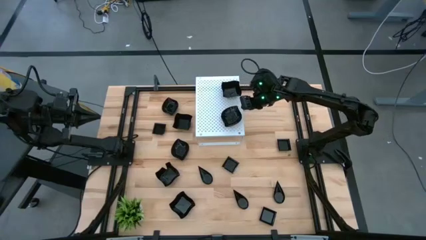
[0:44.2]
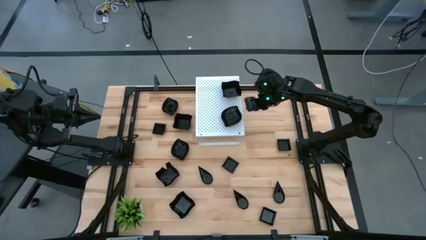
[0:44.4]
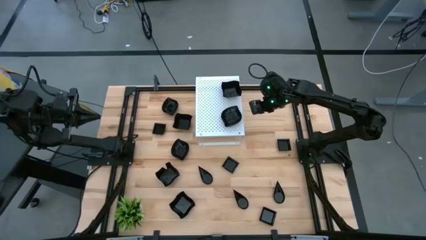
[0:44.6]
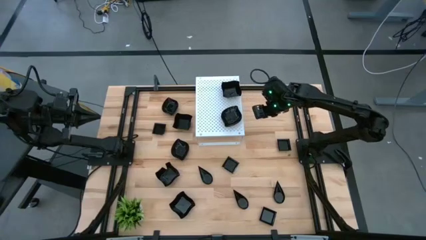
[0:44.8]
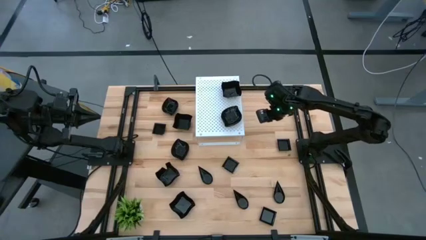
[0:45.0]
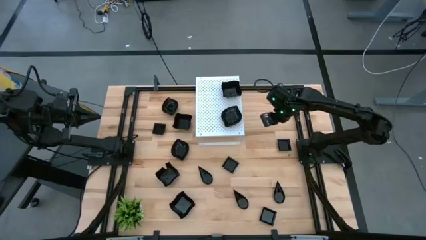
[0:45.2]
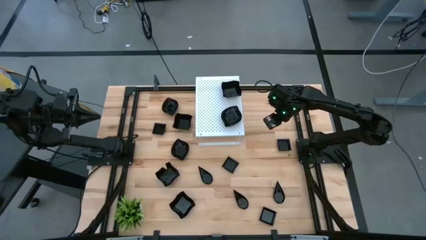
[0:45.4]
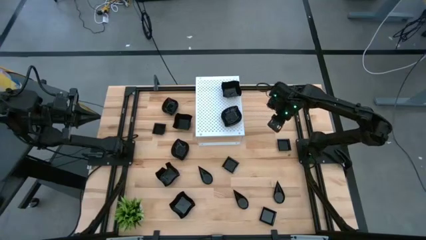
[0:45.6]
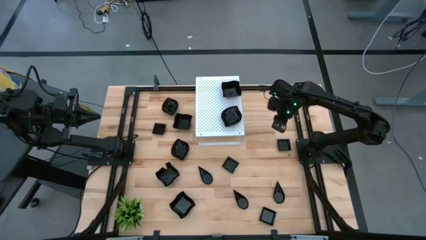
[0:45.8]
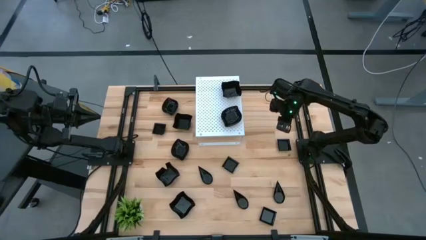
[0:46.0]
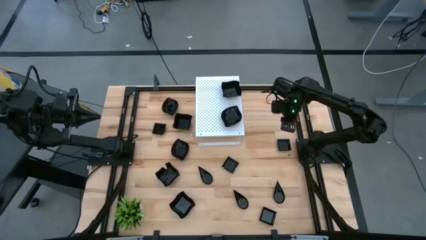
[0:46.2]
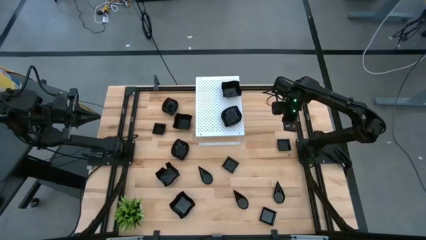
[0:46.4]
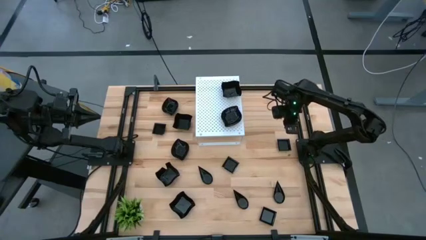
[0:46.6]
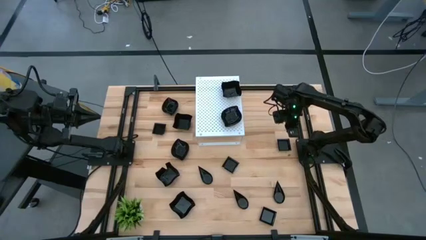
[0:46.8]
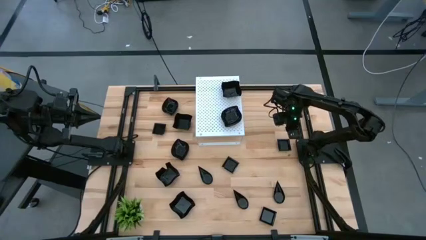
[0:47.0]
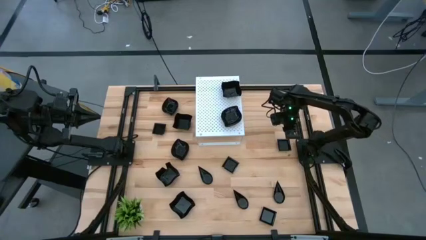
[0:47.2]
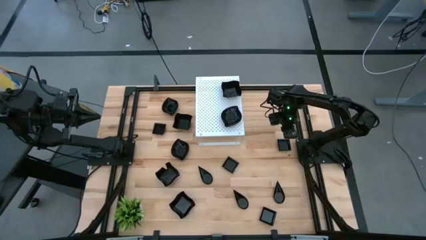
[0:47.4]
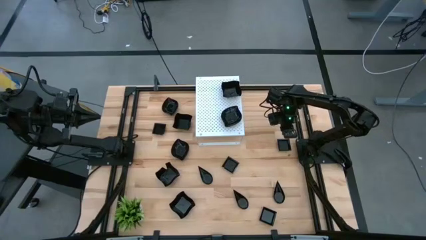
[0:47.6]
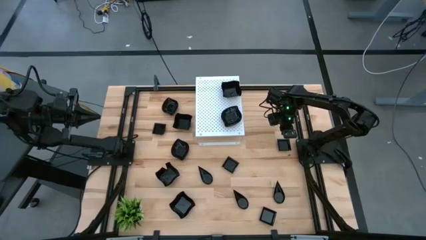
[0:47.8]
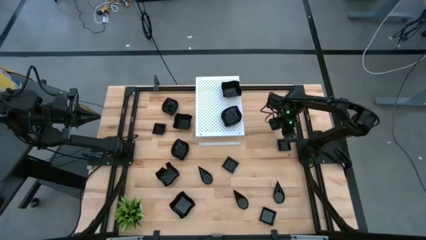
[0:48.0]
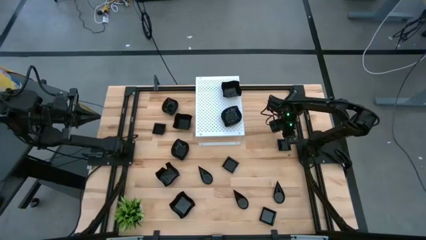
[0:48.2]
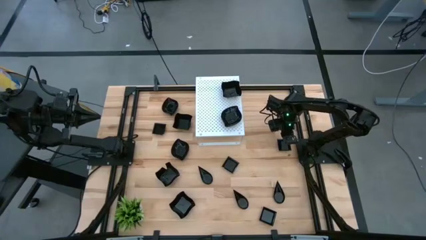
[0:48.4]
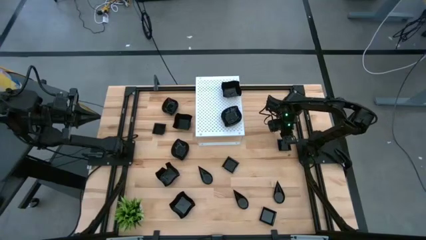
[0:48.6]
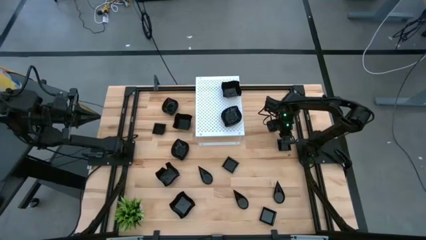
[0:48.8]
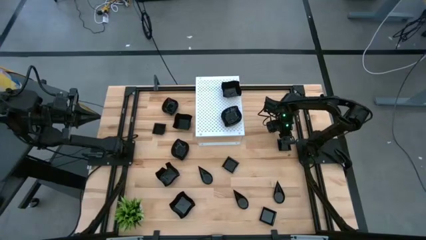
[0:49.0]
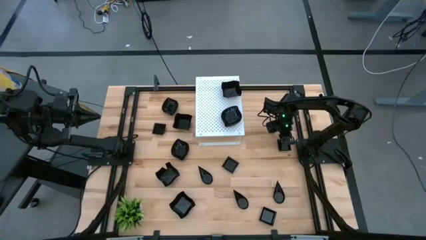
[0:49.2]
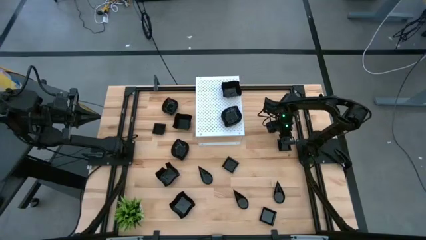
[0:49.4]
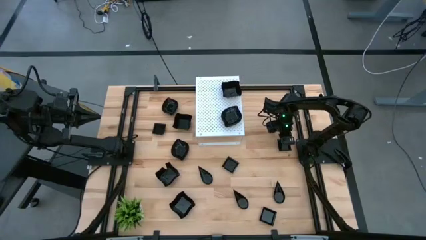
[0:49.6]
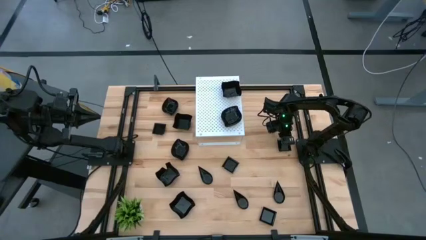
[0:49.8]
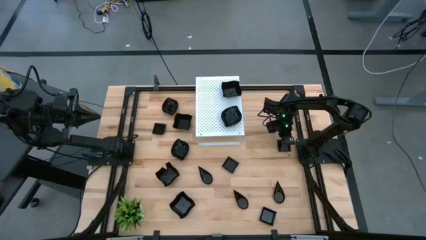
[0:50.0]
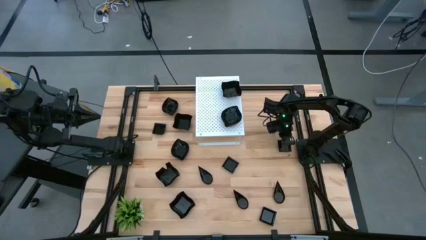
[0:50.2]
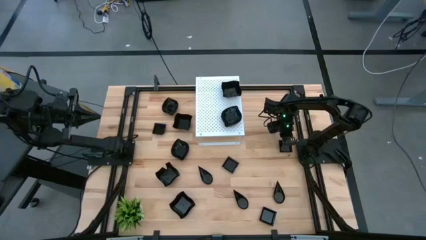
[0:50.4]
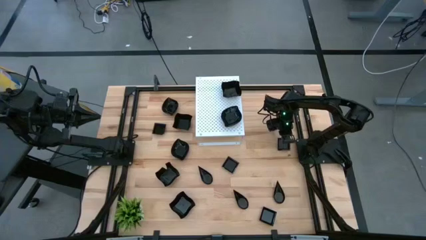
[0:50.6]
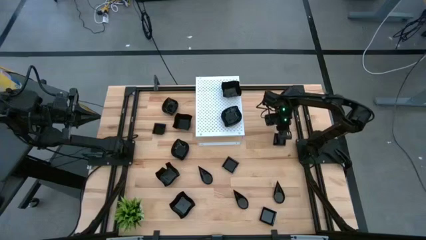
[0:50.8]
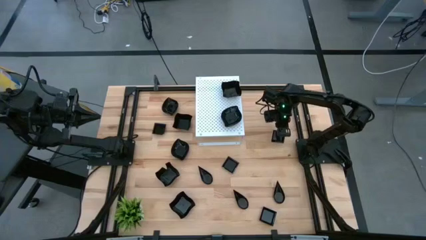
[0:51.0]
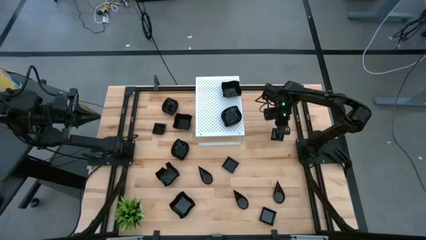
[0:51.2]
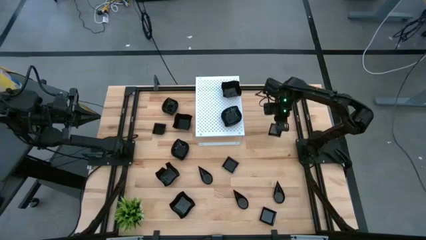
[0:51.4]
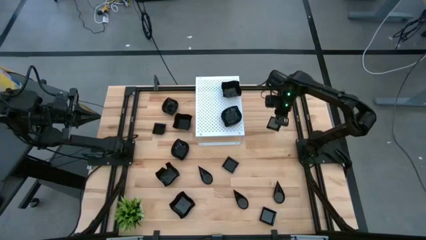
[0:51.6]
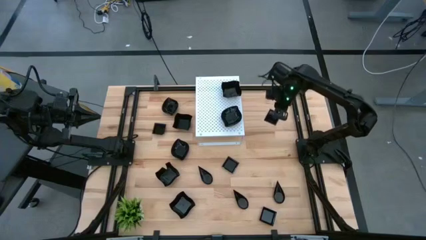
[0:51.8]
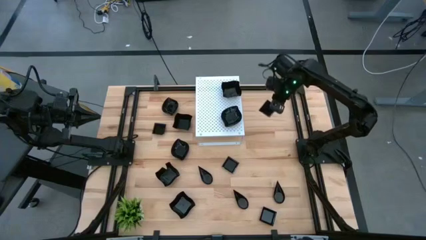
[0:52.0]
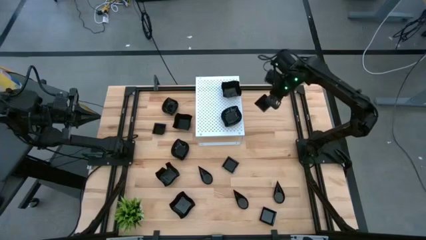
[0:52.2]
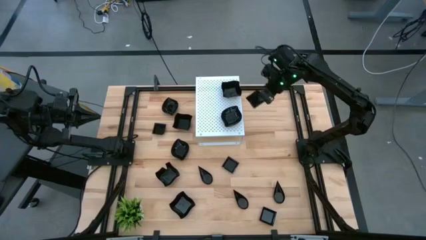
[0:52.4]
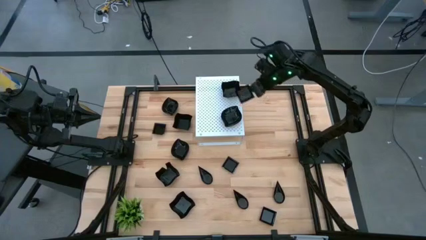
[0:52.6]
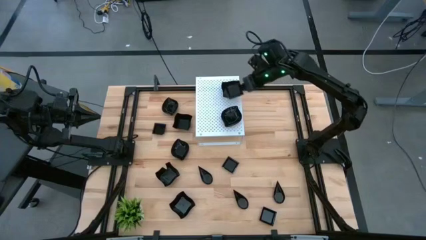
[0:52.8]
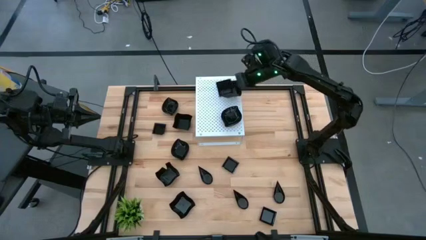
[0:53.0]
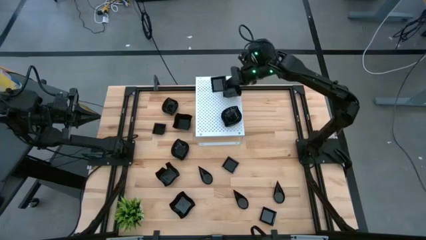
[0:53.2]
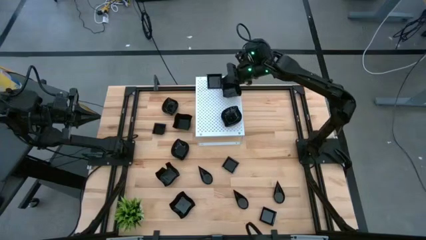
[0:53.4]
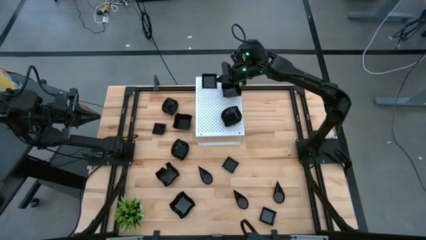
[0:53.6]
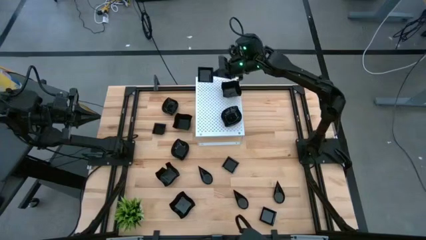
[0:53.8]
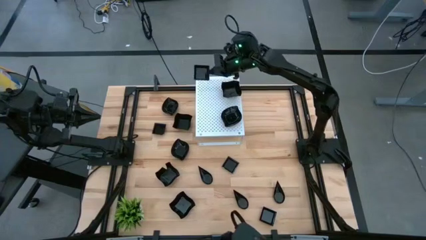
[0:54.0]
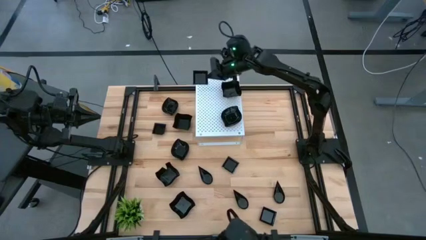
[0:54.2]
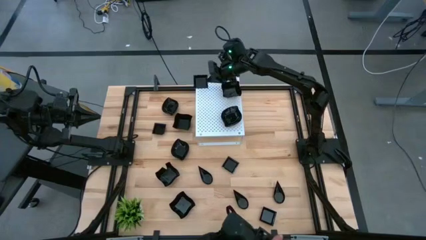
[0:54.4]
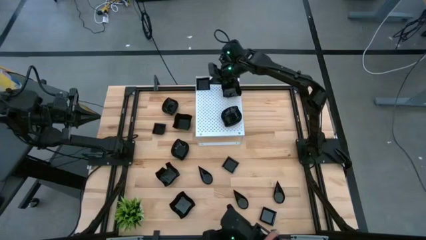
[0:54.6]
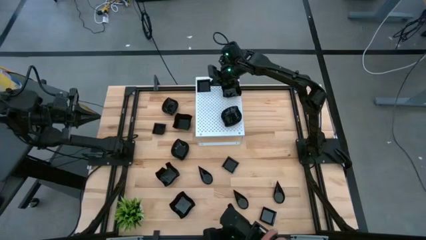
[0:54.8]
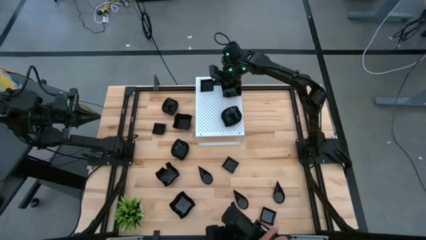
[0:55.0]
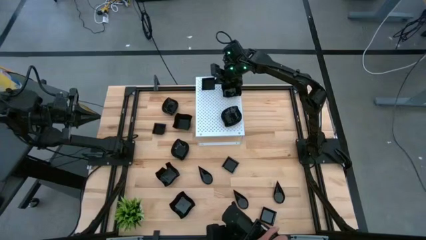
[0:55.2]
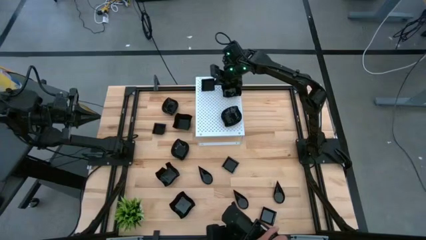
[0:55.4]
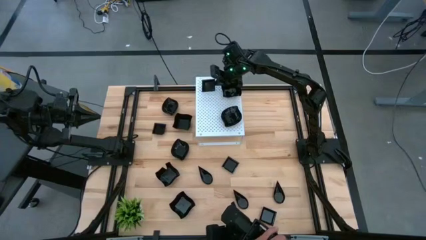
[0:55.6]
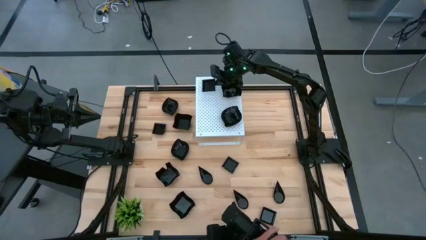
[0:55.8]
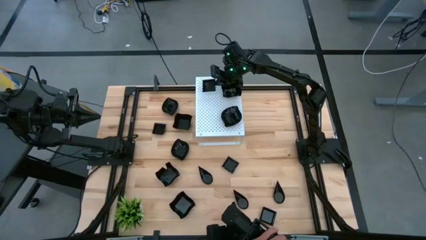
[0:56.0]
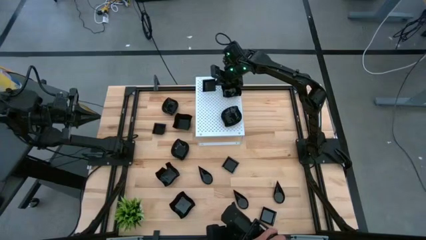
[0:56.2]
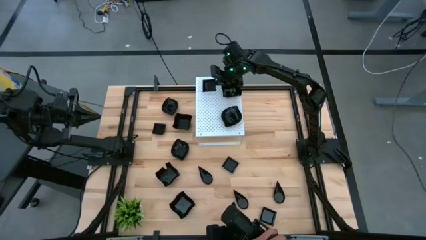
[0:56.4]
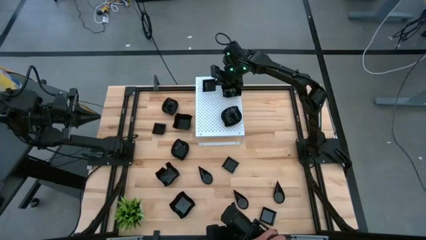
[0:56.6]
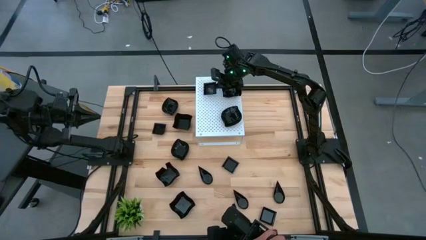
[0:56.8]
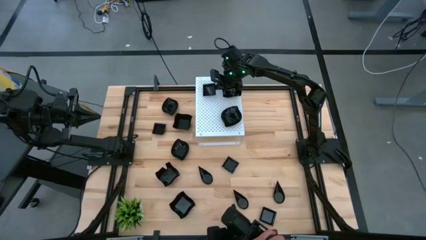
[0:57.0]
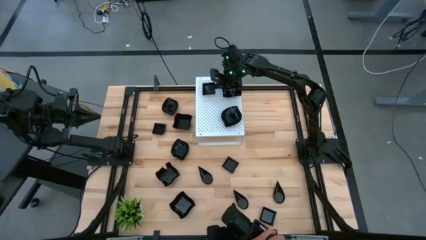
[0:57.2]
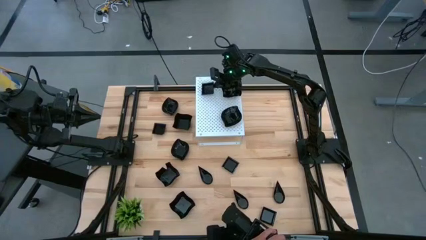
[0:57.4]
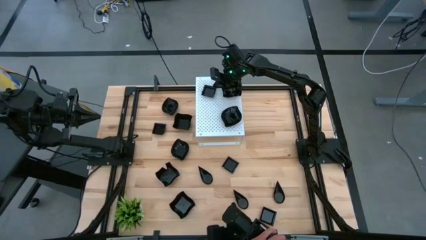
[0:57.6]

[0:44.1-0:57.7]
Task: Pick & Place Mini shaped plates
Put the square plate on the shelf
